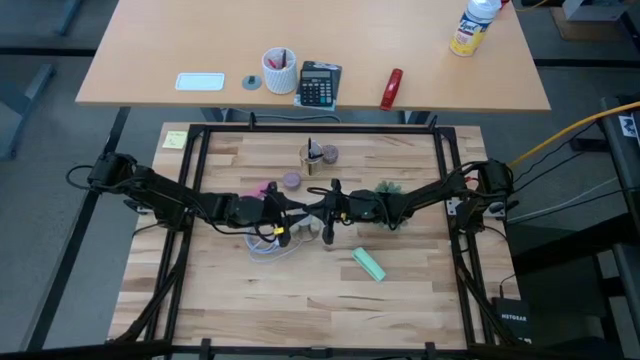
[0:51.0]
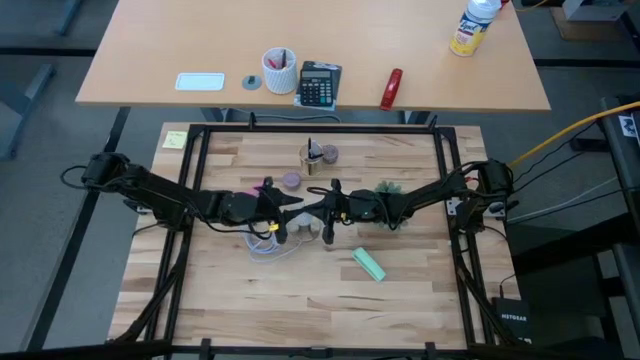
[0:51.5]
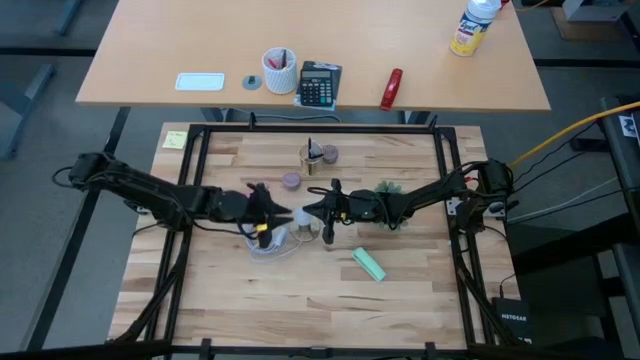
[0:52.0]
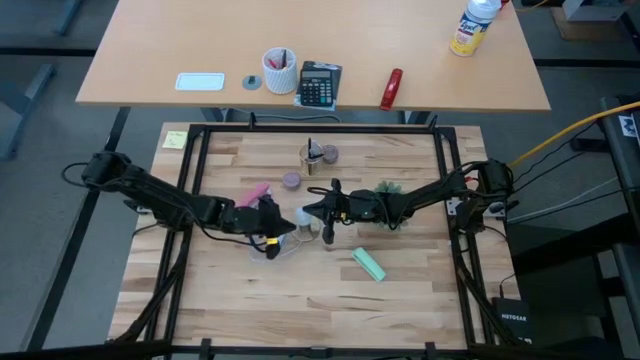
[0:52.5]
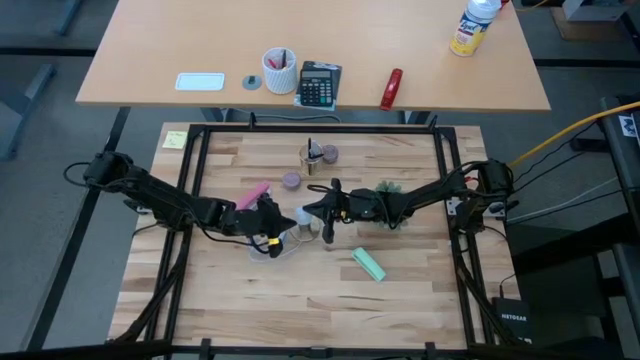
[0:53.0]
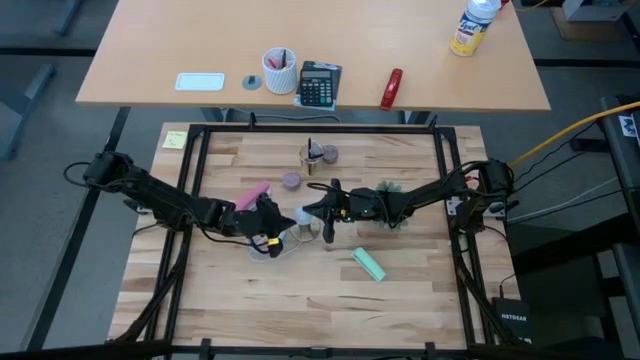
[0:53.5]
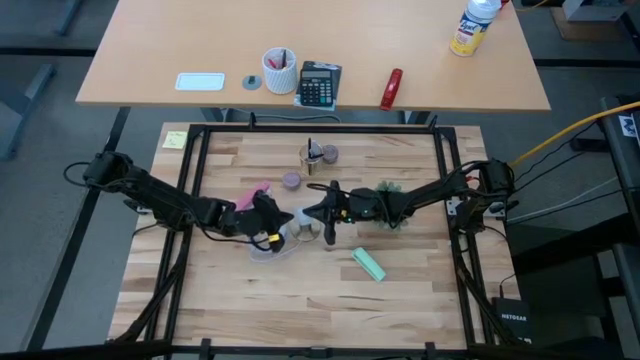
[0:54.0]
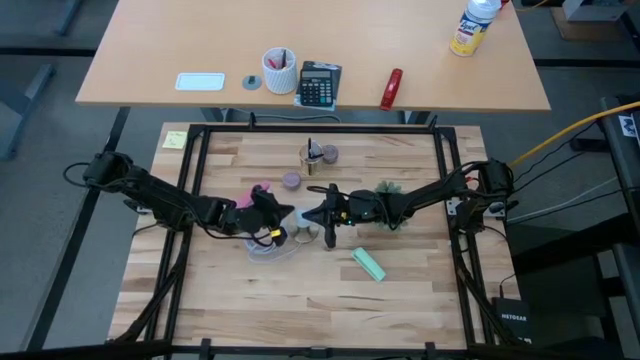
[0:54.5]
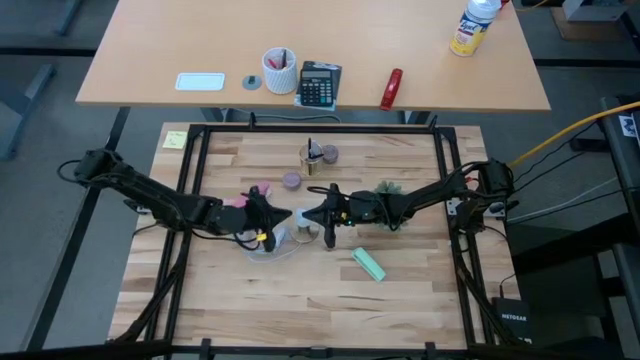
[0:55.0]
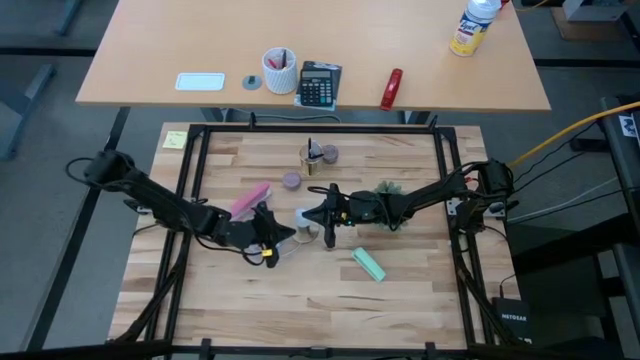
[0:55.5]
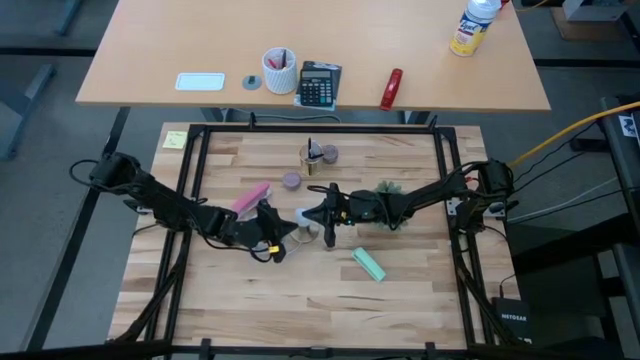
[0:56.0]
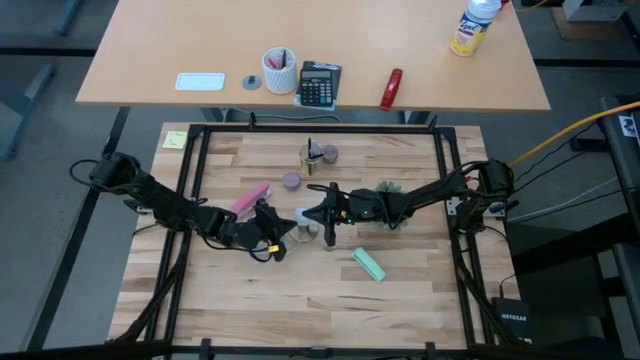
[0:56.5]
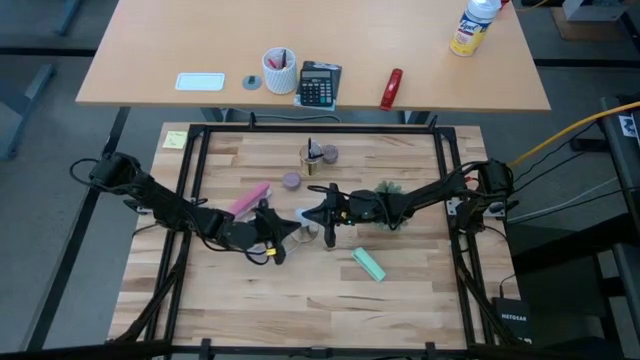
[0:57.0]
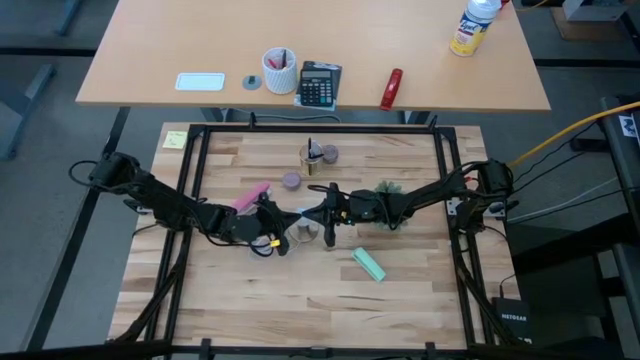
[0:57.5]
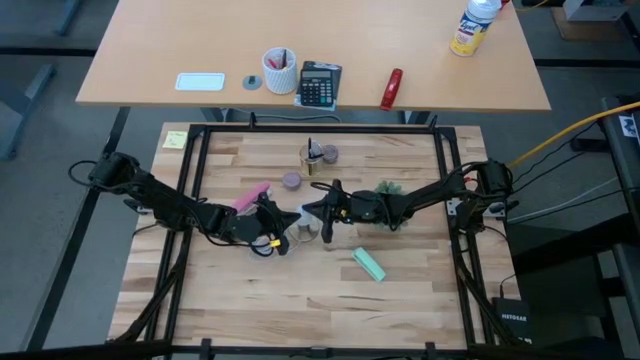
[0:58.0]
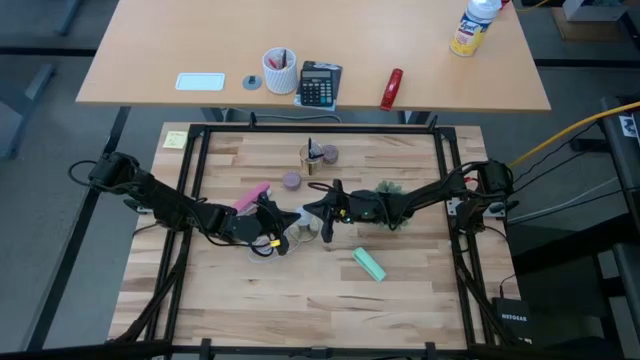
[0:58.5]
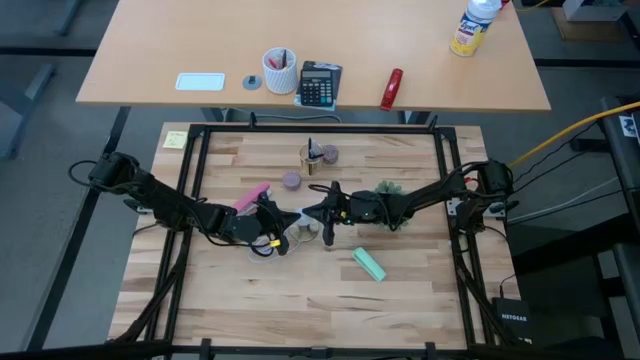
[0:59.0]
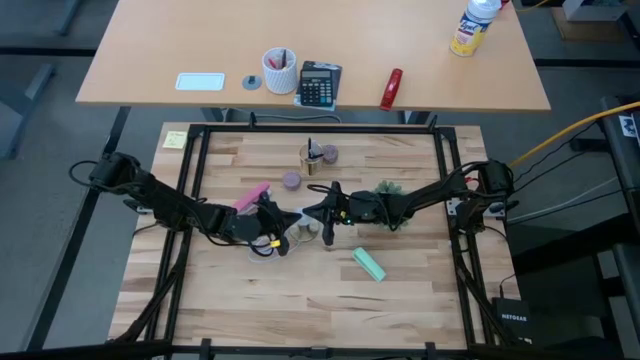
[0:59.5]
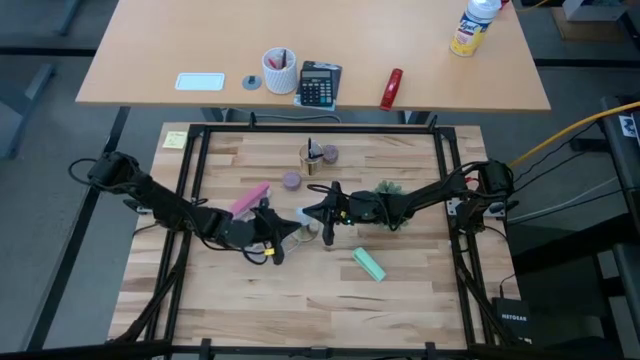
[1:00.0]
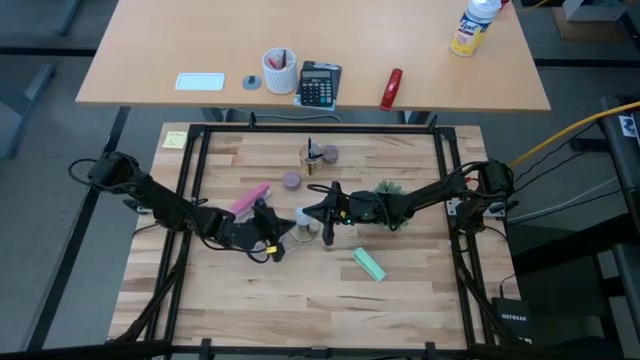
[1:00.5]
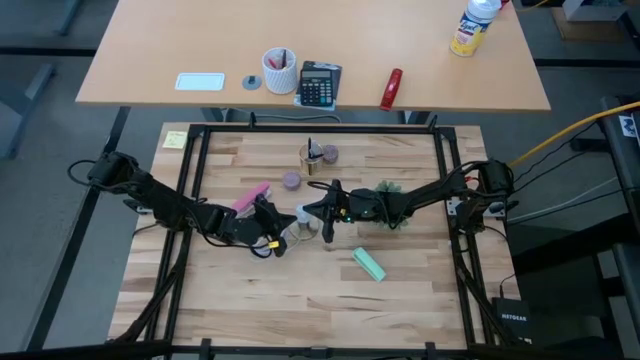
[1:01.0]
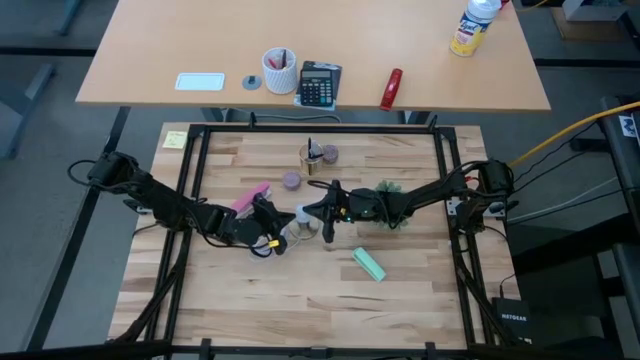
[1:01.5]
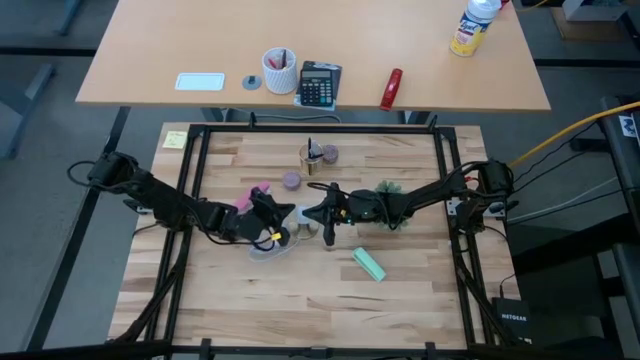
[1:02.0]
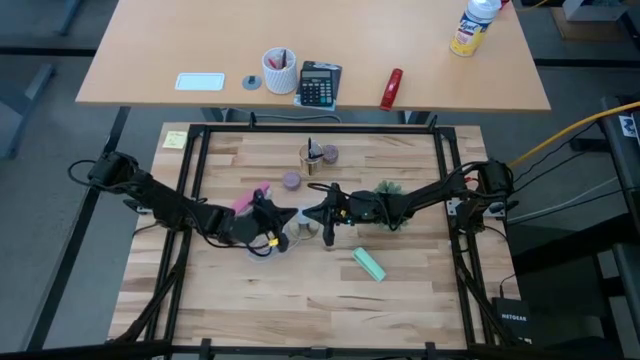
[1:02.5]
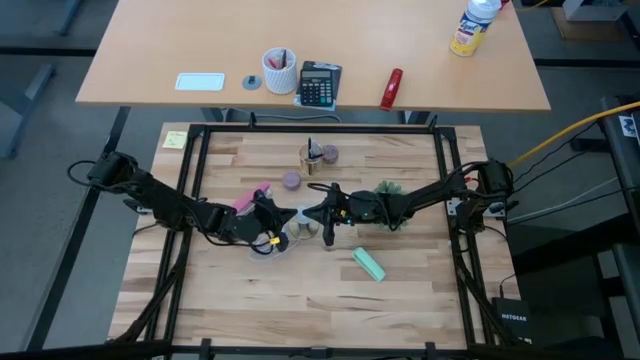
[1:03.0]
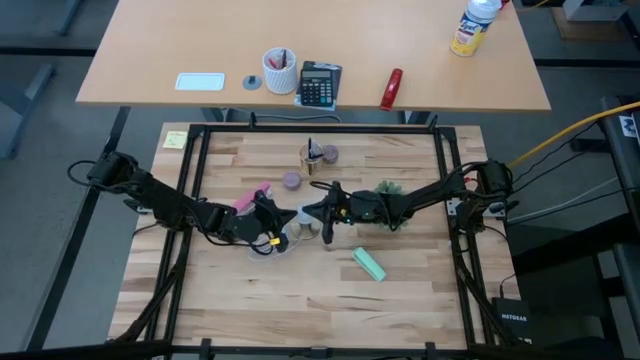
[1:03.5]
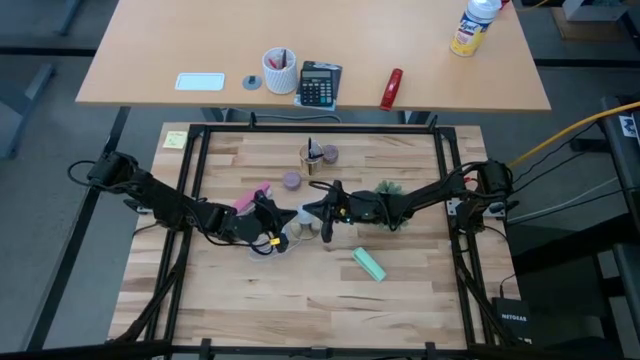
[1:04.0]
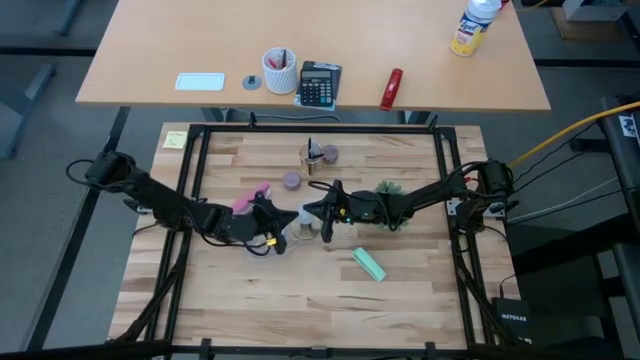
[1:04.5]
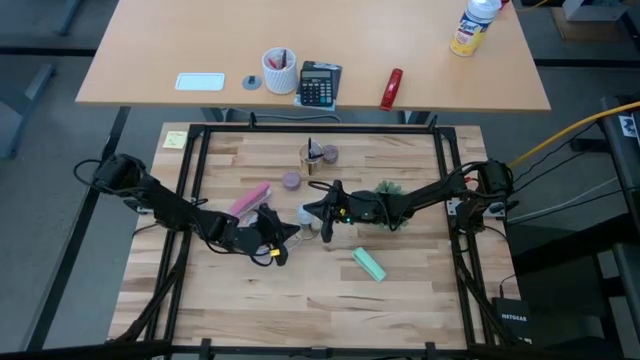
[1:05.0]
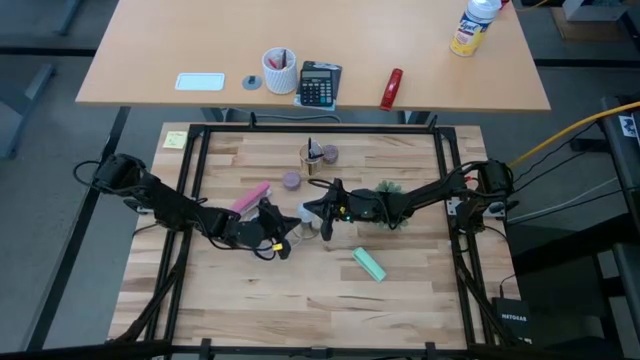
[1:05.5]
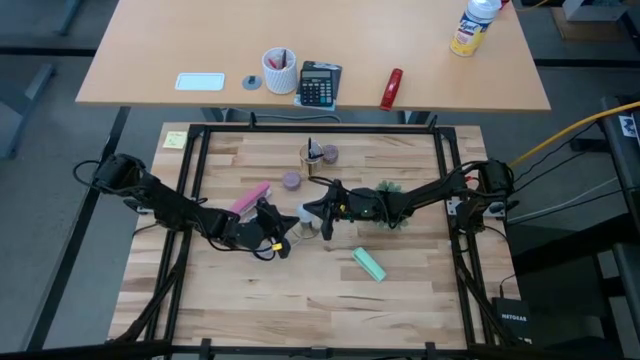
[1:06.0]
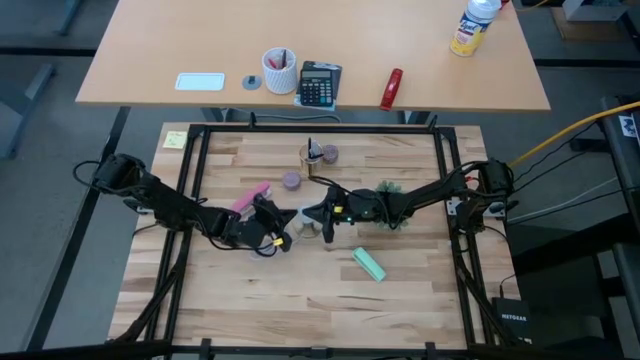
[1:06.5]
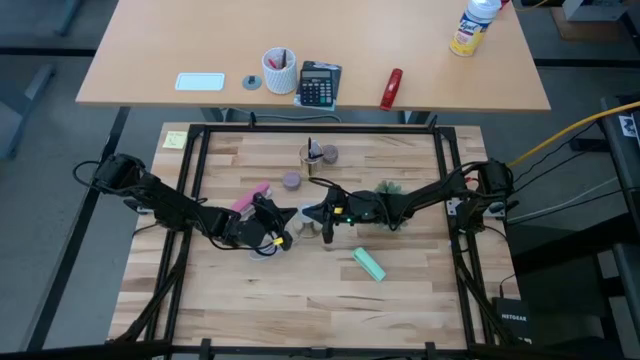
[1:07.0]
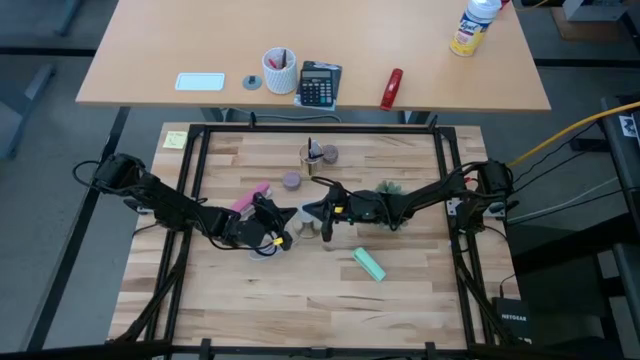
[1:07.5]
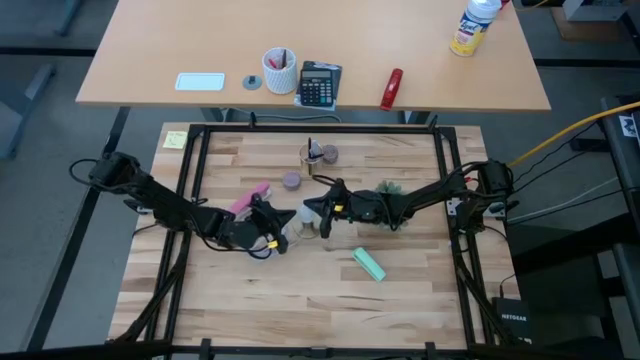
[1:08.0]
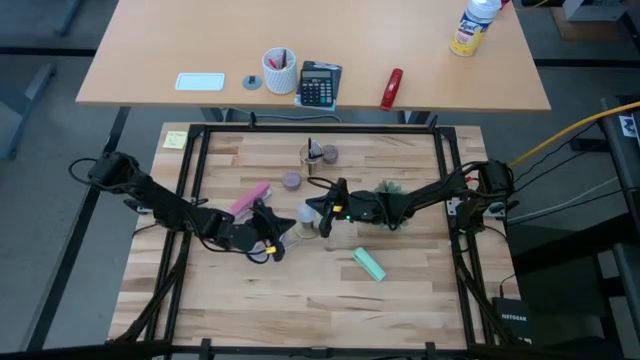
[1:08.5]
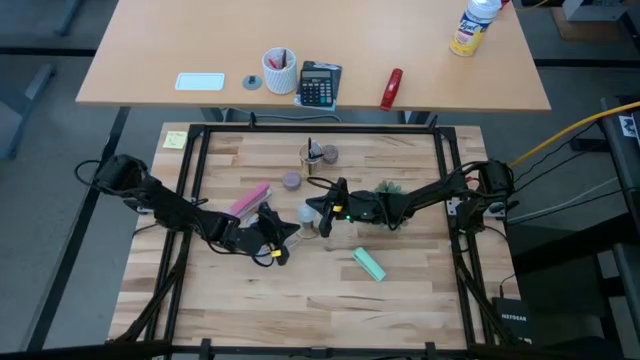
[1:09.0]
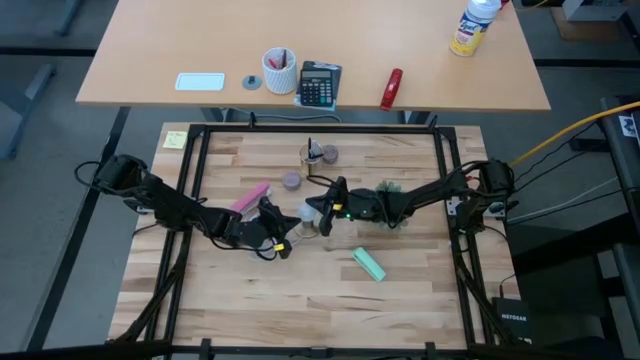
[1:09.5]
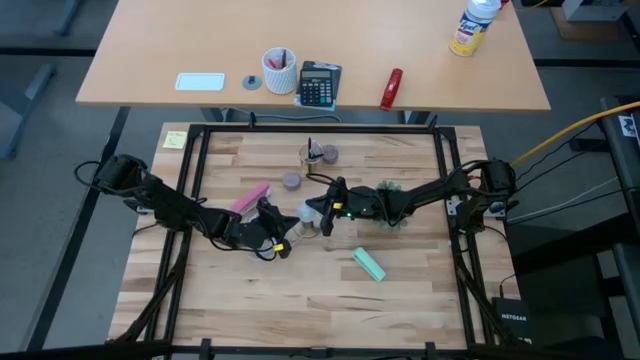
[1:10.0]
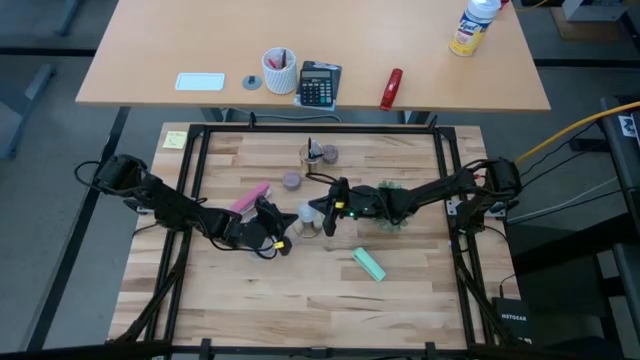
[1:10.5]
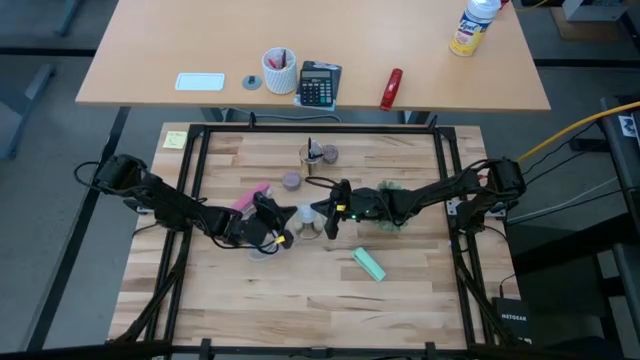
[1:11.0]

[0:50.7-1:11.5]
Task: Screw lightbulb
Insert the lightbulb into the lamp
